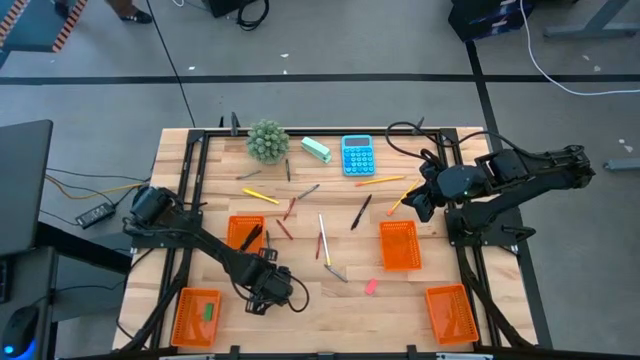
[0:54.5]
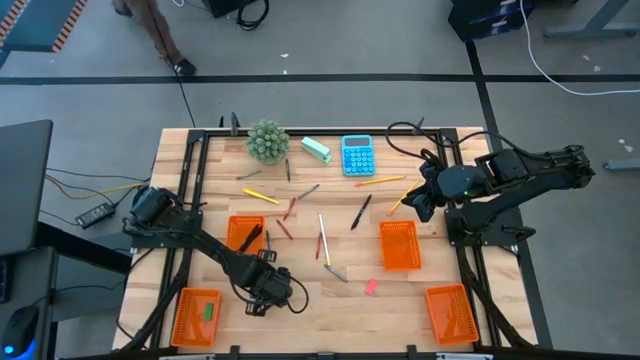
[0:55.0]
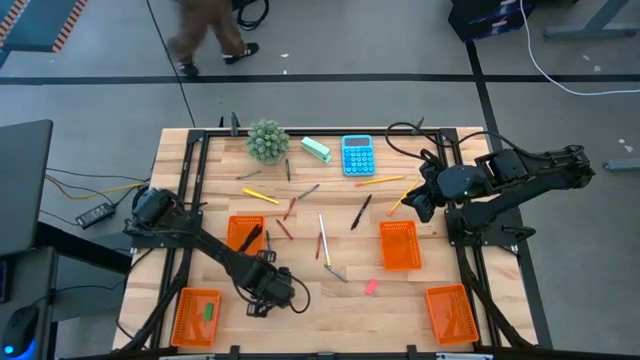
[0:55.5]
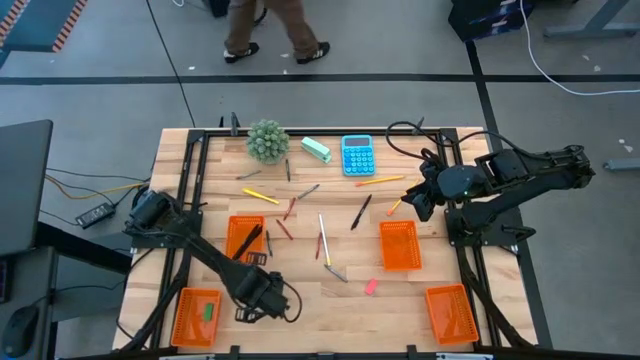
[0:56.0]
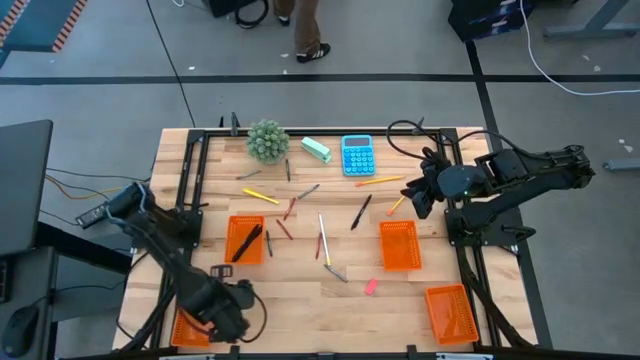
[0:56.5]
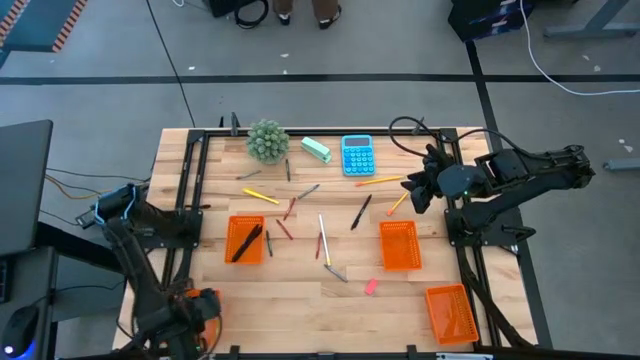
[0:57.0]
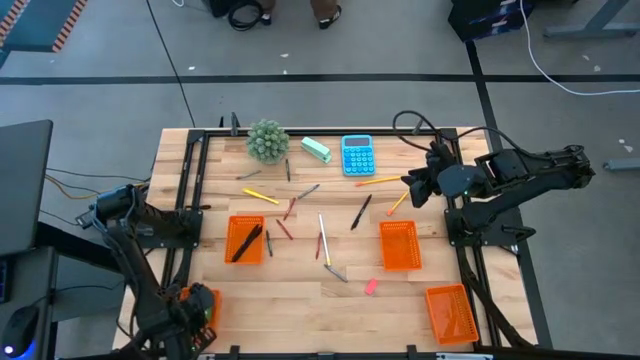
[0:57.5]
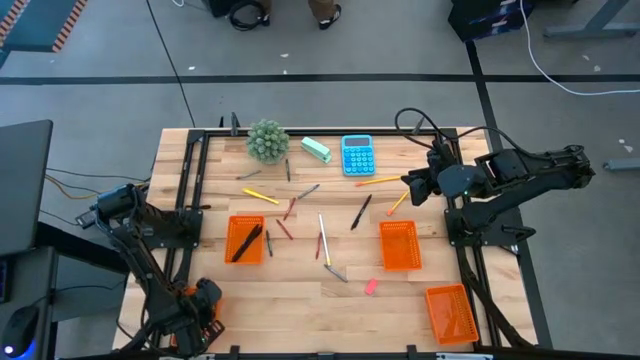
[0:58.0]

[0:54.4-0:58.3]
Task: Sort crayons/erasers/pens/pencils in bins
Put the yellow eraser into the bottom left orange basket

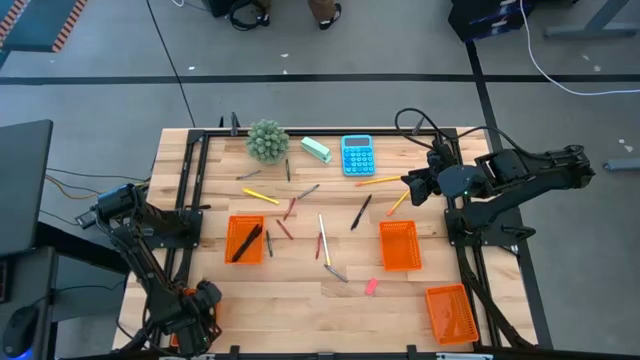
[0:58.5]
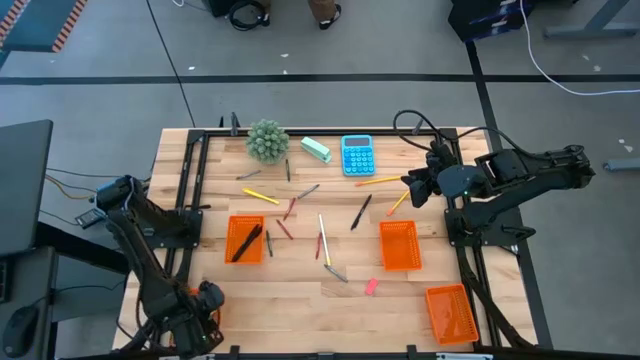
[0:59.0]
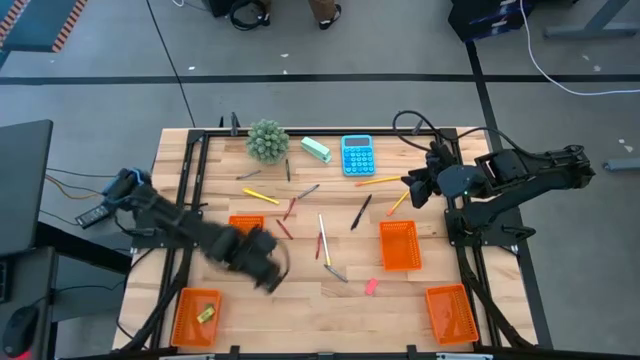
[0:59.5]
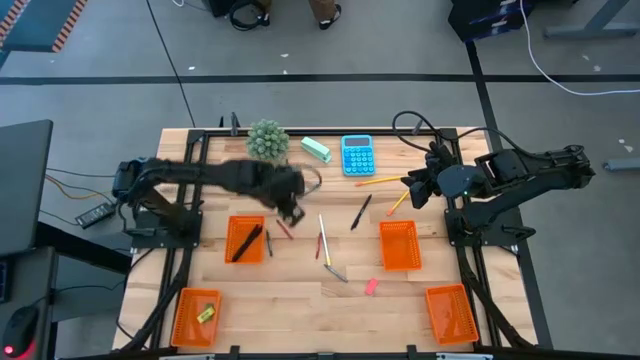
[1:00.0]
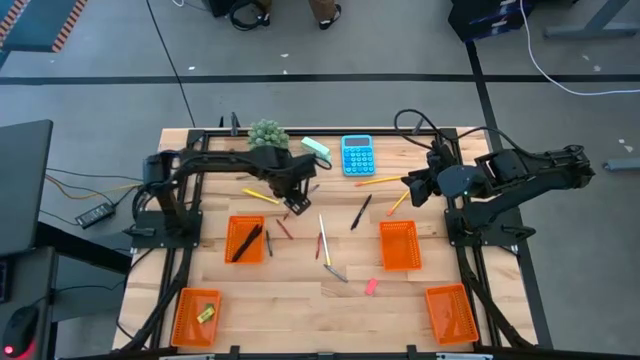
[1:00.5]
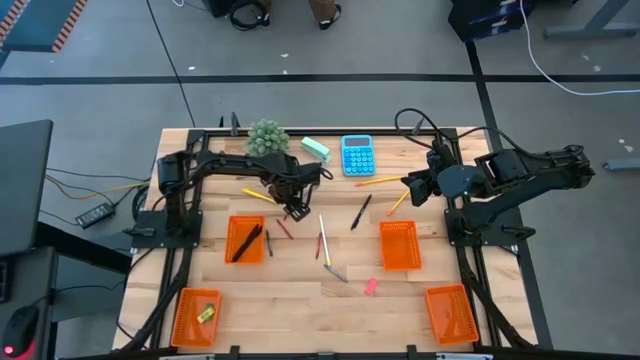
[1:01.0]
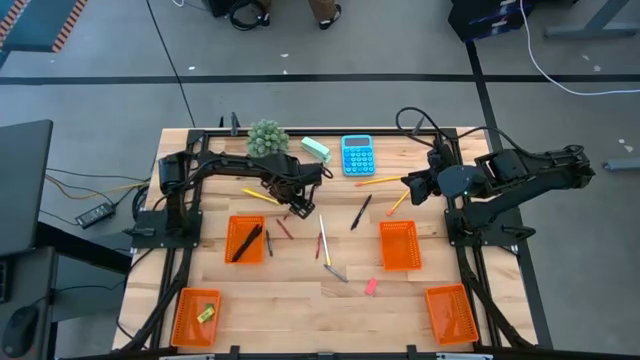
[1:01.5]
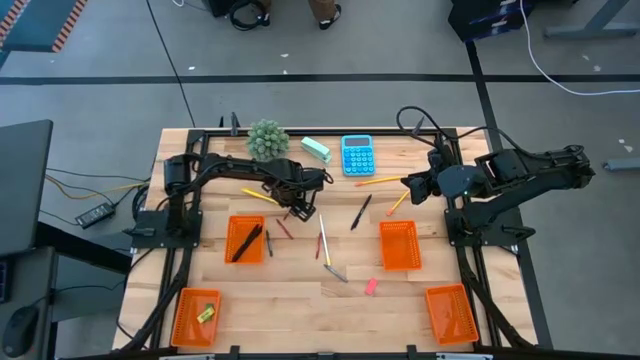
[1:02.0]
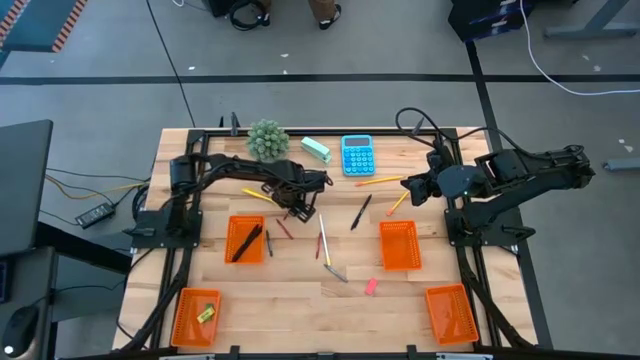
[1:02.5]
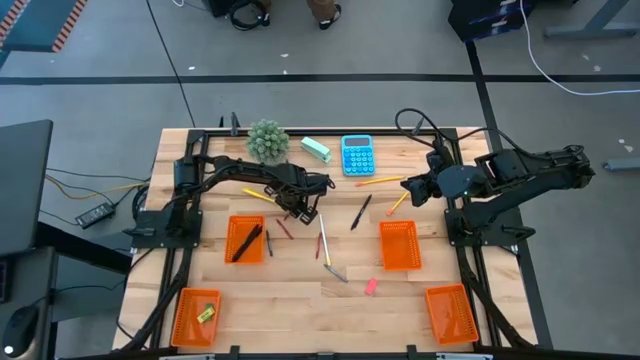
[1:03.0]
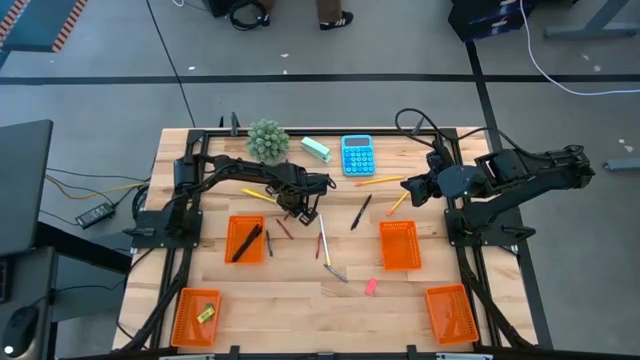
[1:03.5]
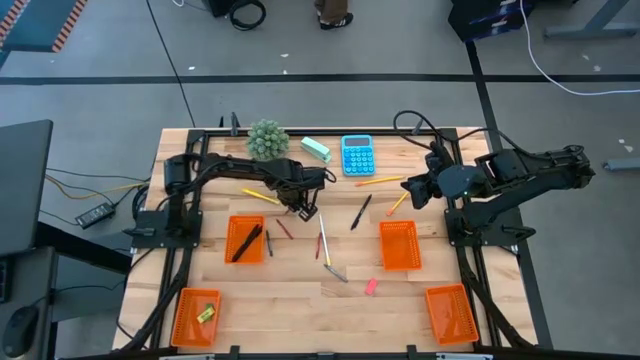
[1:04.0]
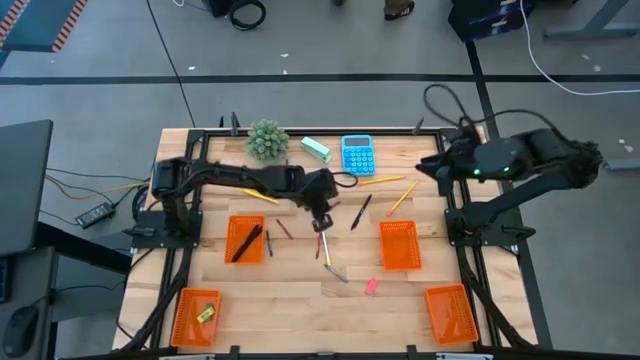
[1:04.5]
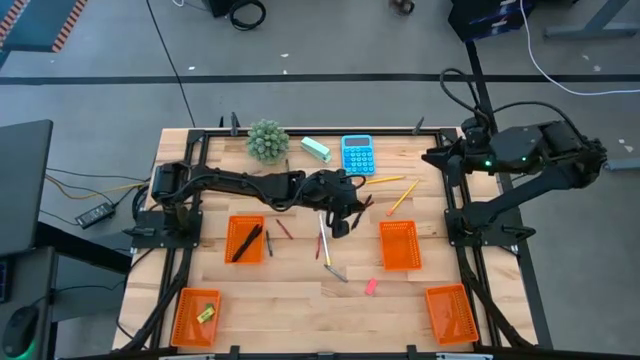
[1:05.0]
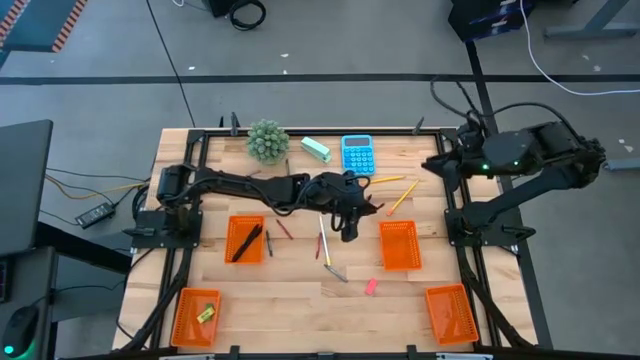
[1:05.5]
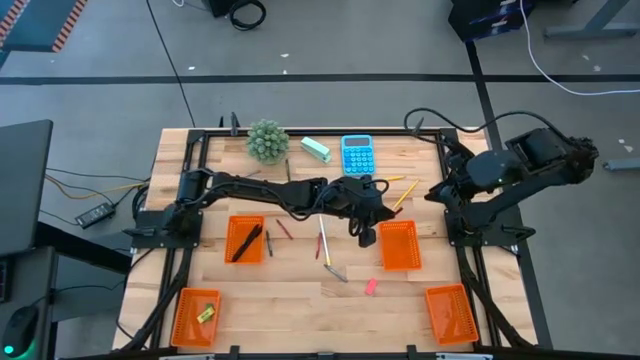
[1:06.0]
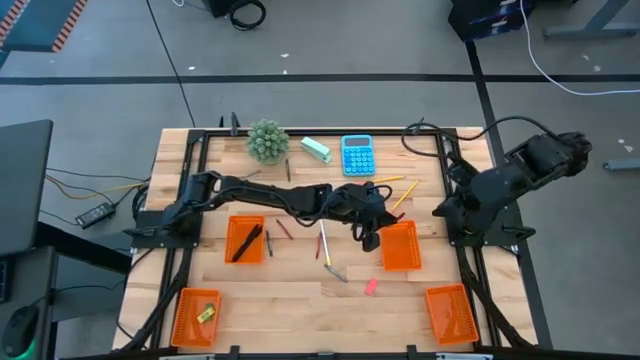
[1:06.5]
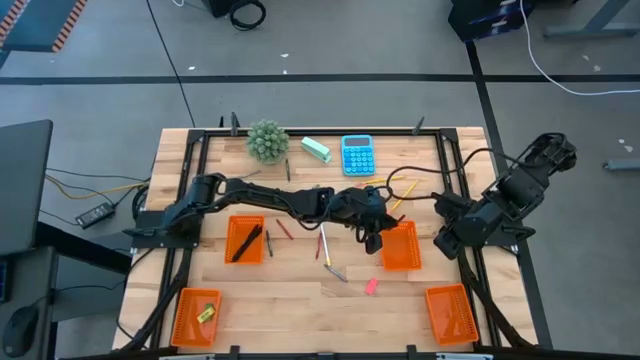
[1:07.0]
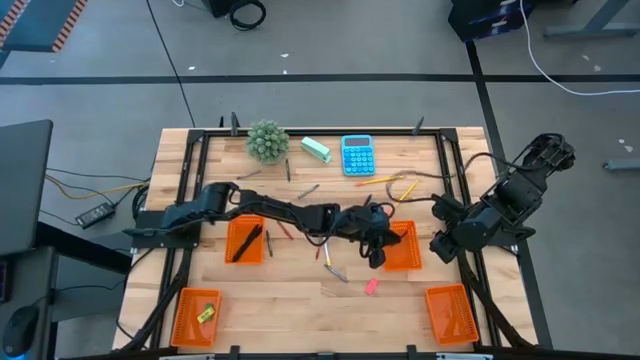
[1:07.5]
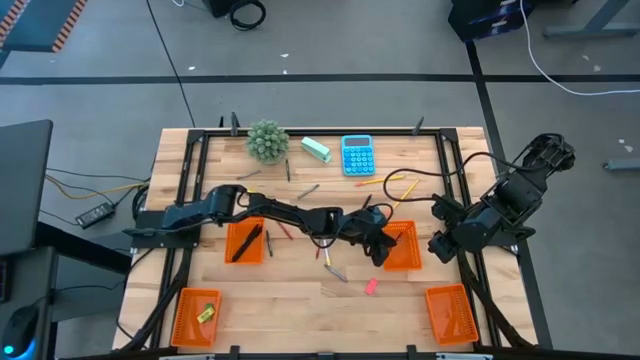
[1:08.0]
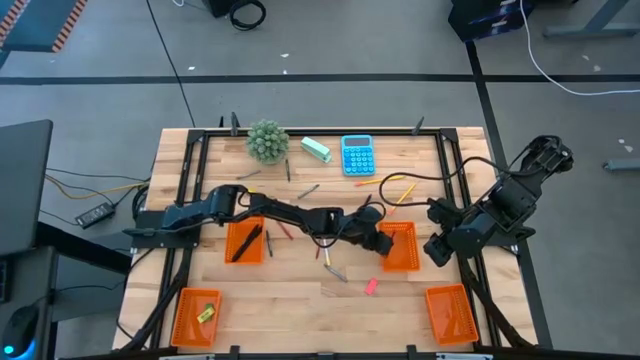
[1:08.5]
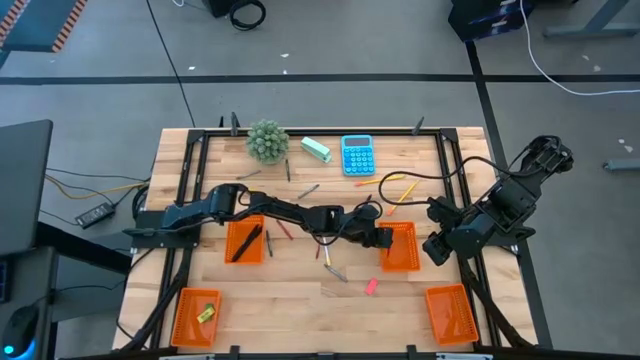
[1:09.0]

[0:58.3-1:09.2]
Put the top red crayon into the top right orange basket

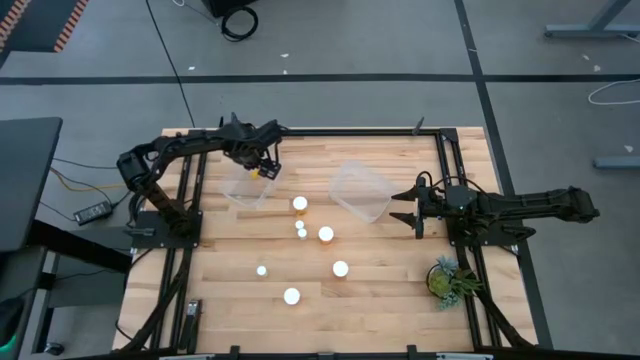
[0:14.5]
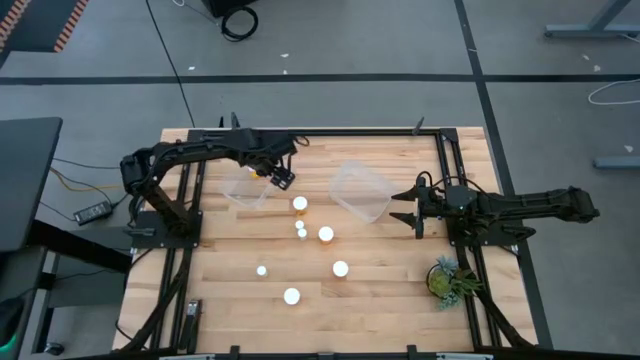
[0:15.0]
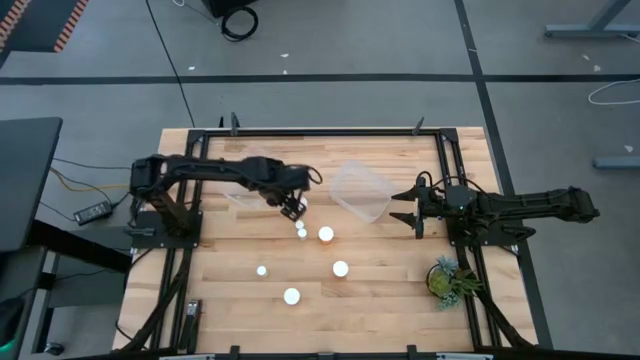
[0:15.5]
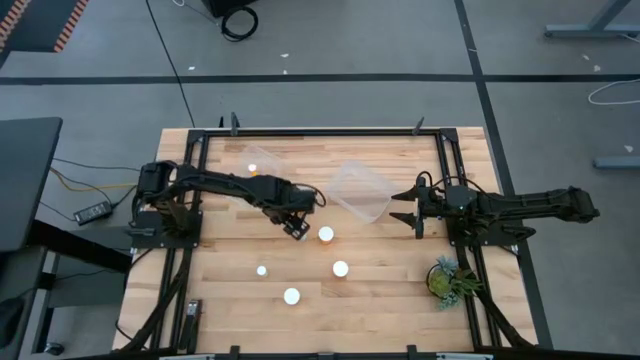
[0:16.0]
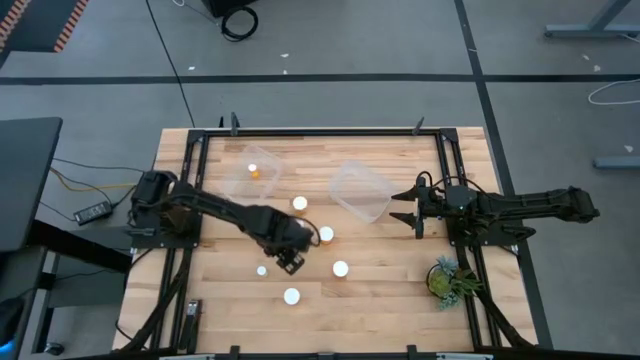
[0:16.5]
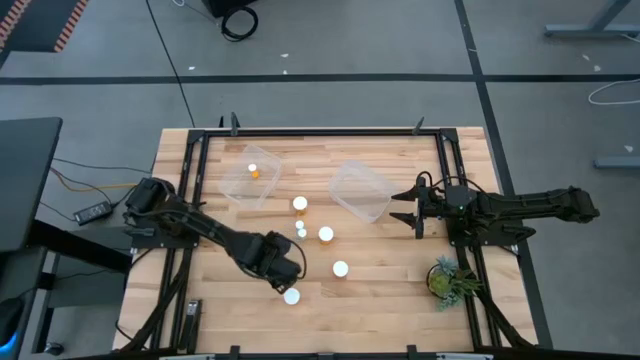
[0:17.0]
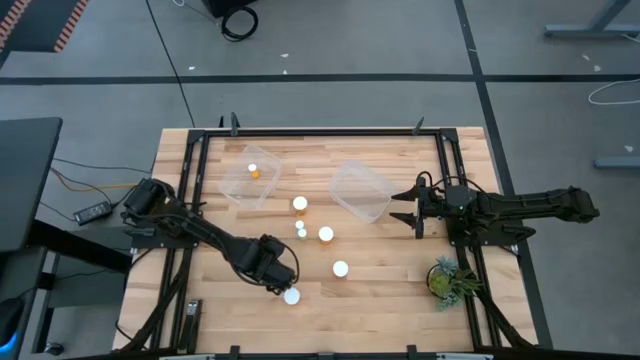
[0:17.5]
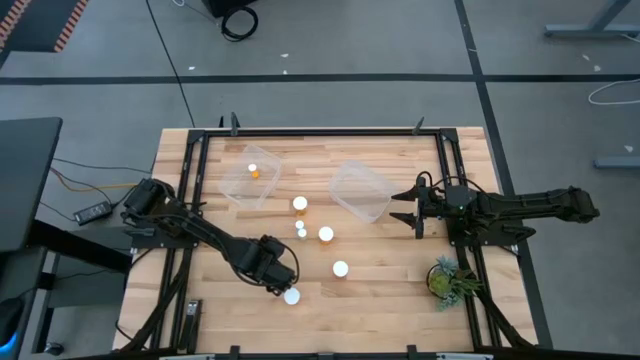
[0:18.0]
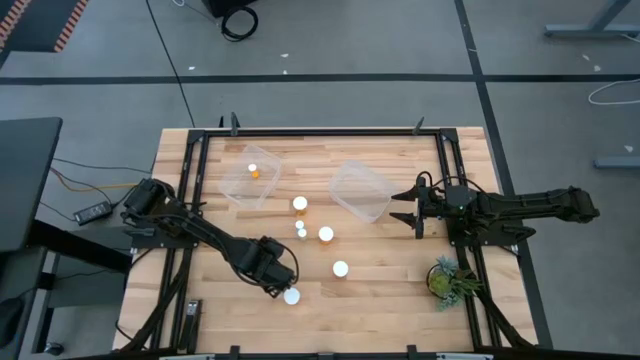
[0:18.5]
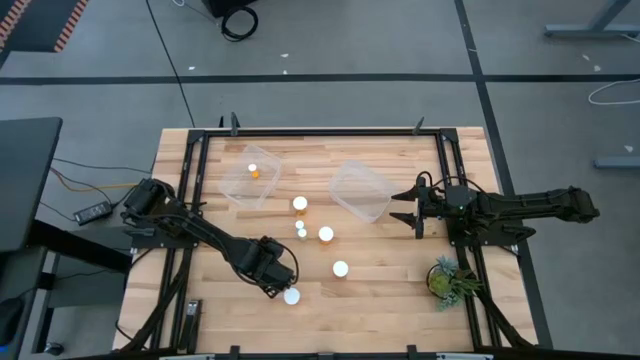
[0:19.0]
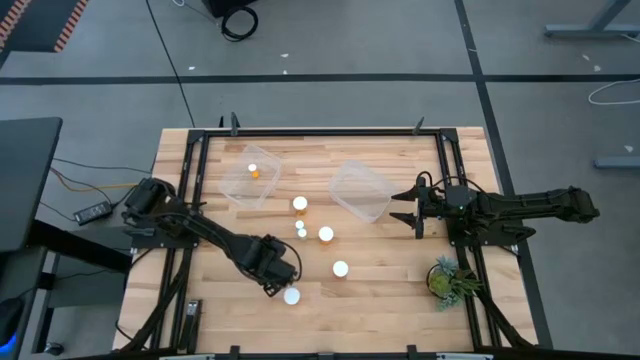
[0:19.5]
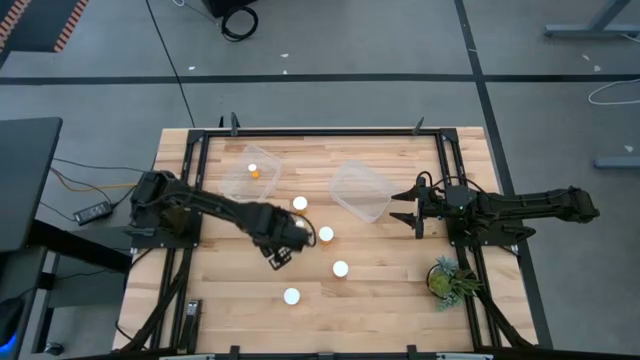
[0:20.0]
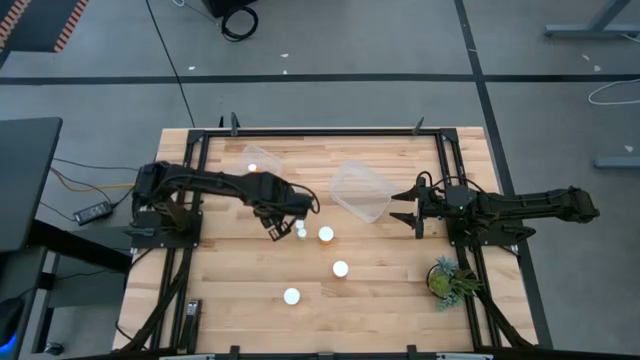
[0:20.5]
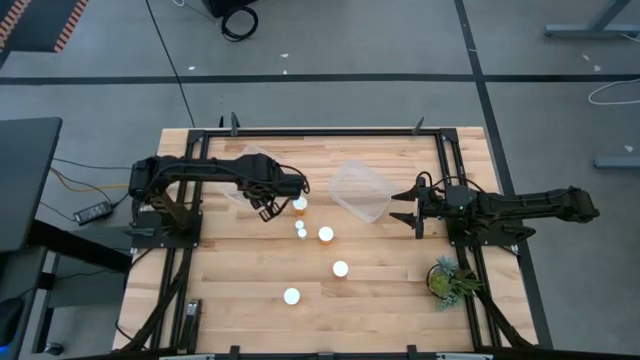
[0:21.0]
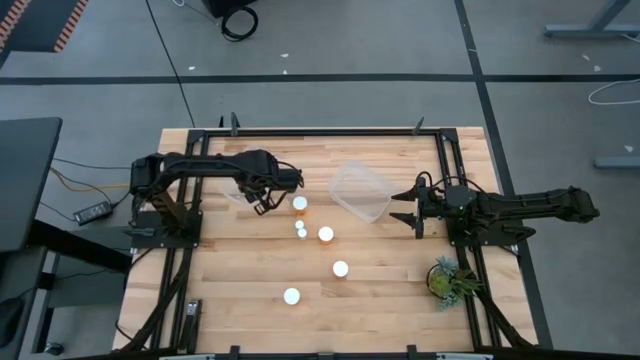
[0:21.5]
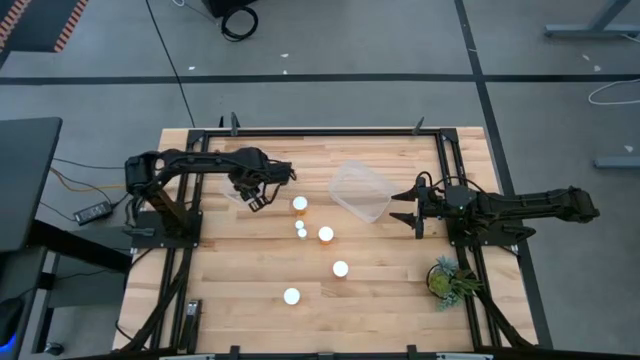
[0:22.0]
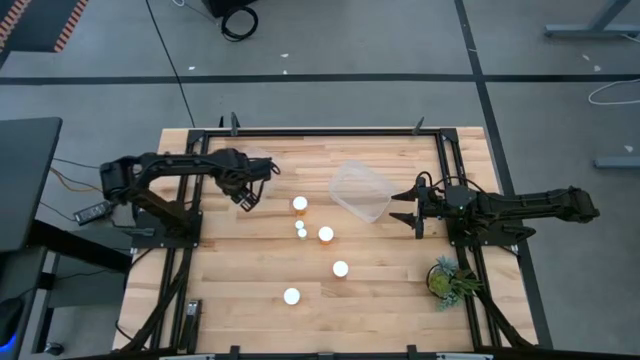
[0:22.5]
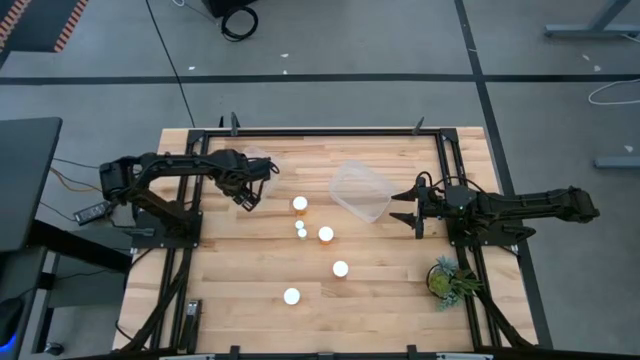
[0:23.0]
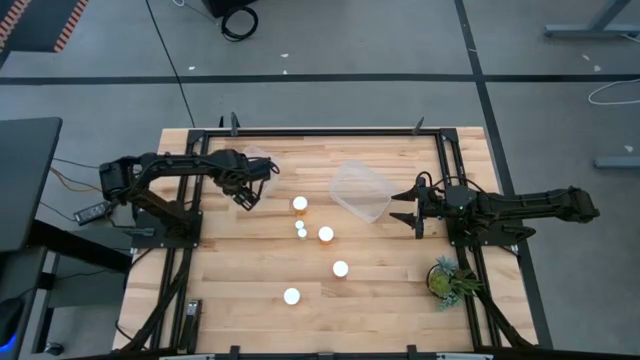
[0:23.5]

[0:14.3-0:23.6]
Task: Pick and place medicine bottles into bin by pill shape (circle, oval)
Put the small yellow pill bottle into the left transparent bin
